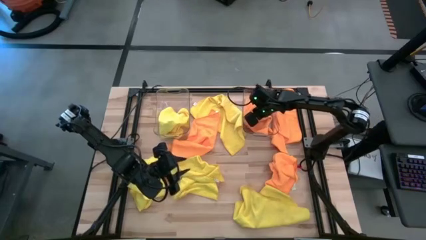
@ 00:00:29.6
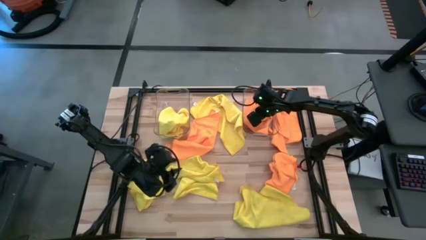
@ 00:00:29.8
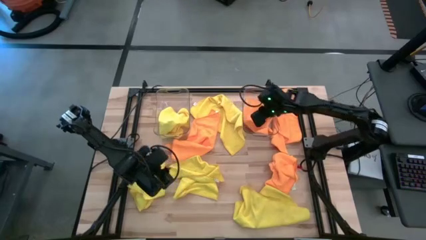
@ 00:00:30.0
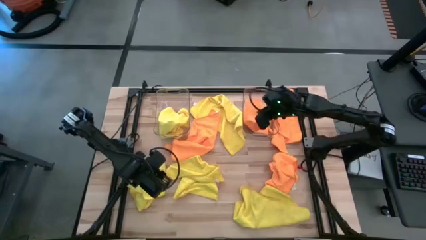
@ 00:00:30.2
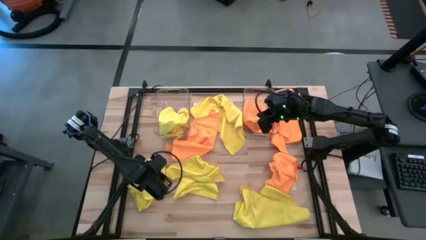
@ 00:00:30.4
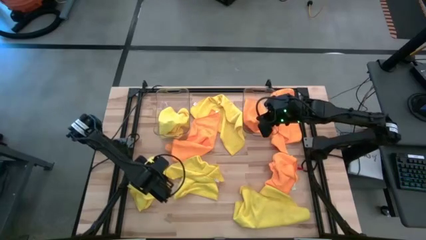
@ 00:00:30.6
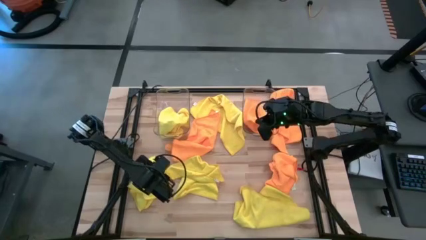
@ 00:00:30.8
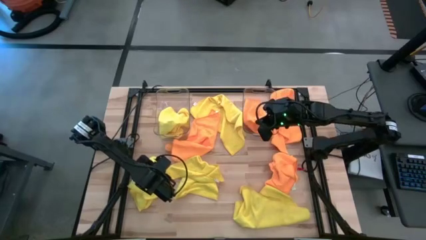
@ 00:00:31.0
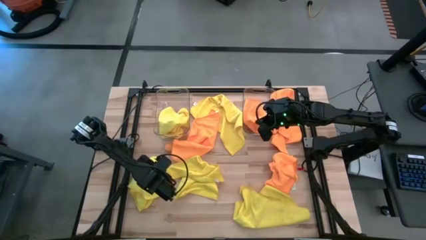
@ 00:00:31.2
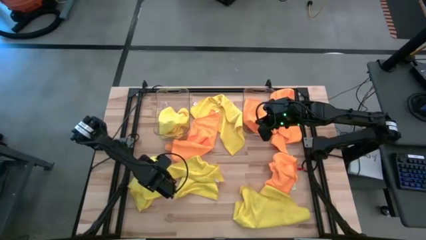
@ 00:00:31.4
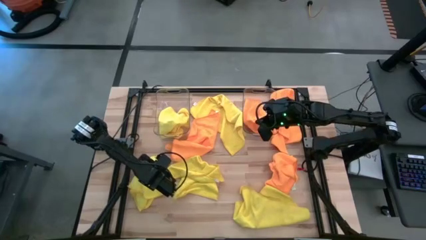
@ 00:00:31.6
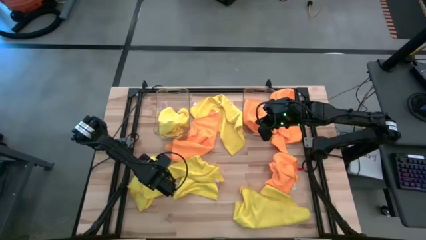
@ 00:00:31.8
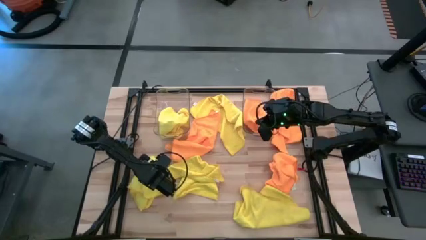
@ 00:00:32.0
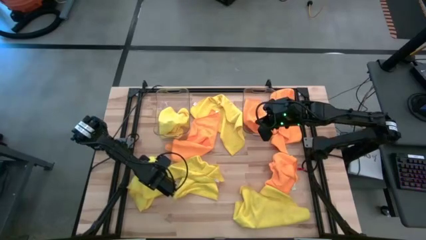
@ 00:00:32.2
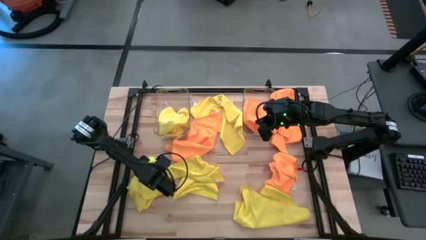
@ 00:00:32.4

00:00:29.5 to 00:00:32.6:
Task: Sort microfiber towel by color & place in baskets
Put the yellow microfiber cloth into the left transparent bin

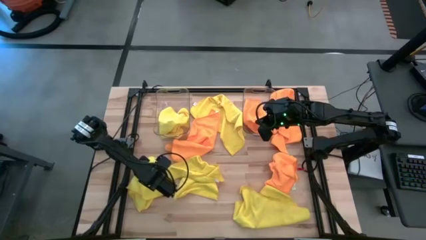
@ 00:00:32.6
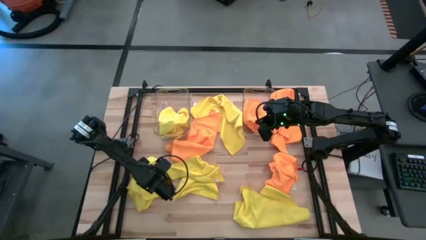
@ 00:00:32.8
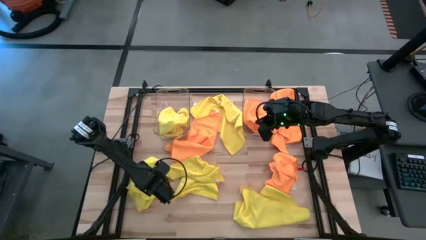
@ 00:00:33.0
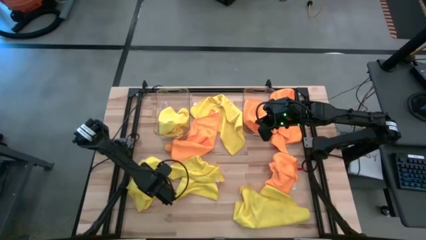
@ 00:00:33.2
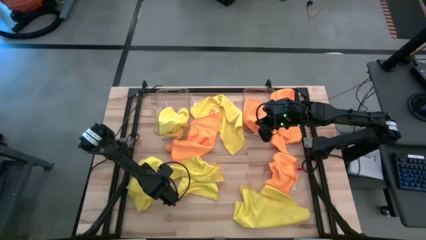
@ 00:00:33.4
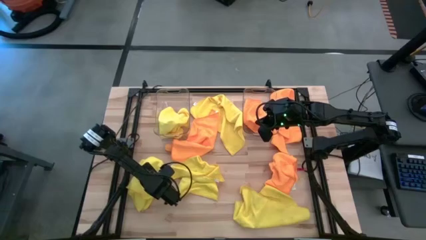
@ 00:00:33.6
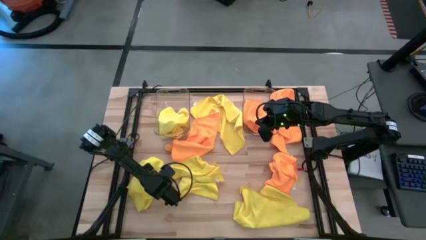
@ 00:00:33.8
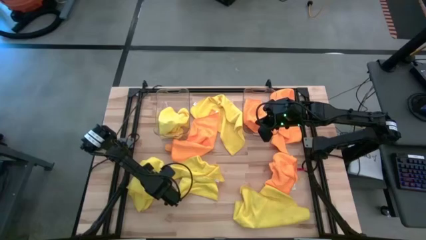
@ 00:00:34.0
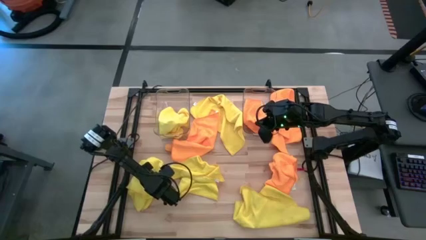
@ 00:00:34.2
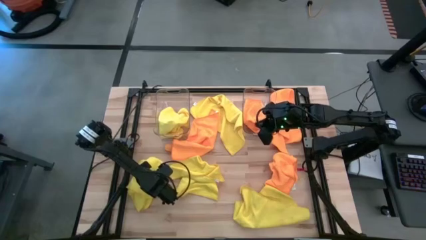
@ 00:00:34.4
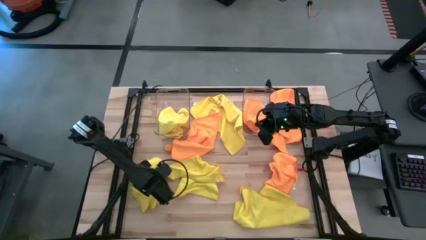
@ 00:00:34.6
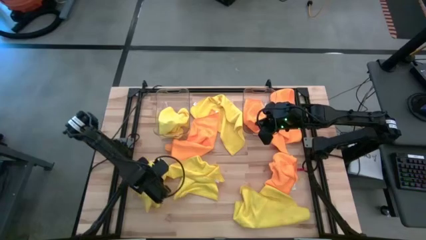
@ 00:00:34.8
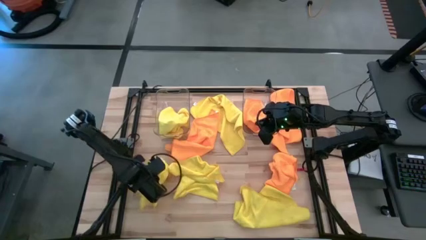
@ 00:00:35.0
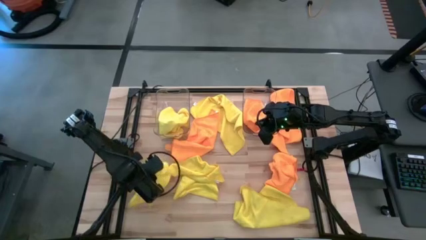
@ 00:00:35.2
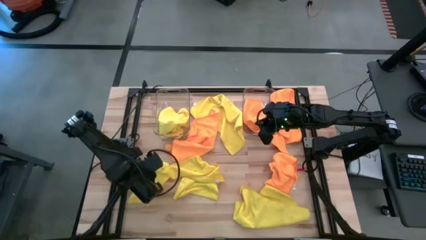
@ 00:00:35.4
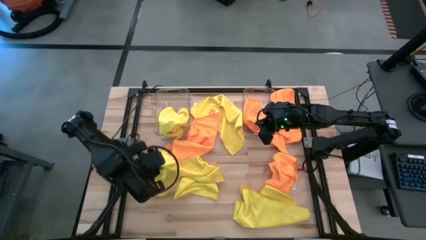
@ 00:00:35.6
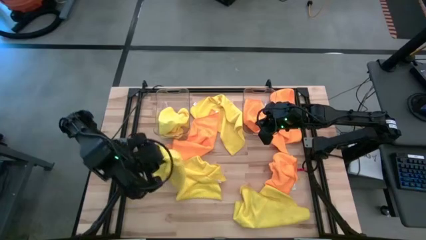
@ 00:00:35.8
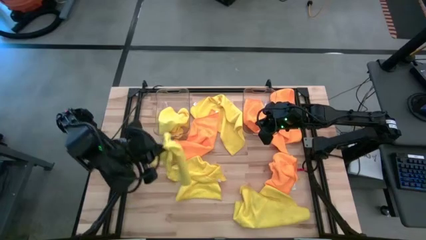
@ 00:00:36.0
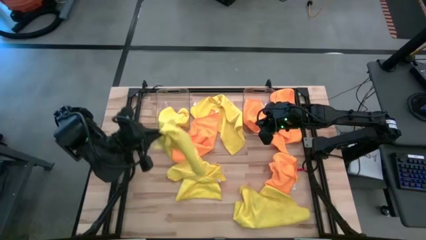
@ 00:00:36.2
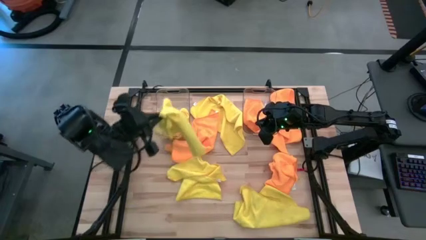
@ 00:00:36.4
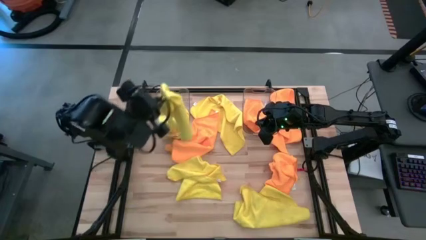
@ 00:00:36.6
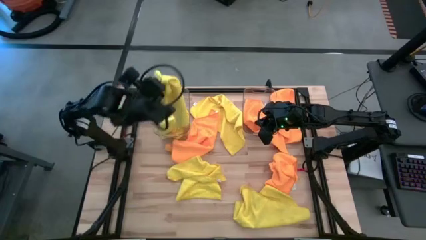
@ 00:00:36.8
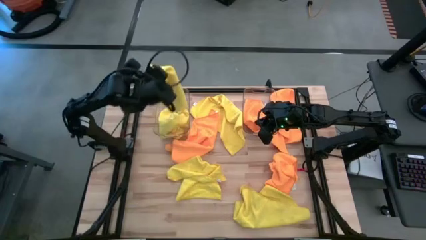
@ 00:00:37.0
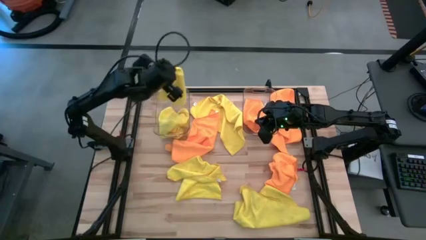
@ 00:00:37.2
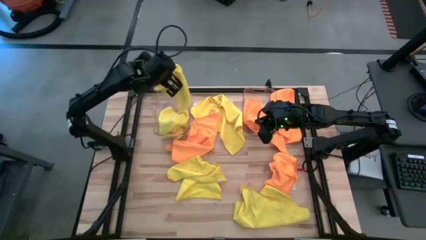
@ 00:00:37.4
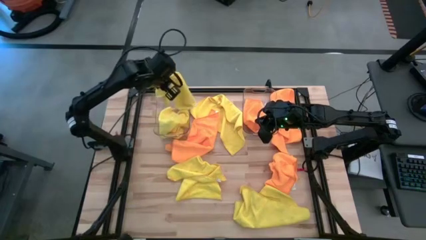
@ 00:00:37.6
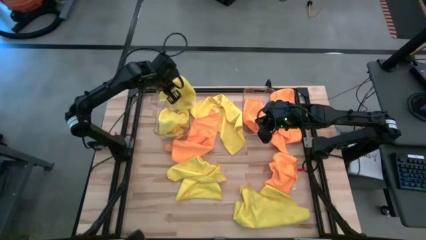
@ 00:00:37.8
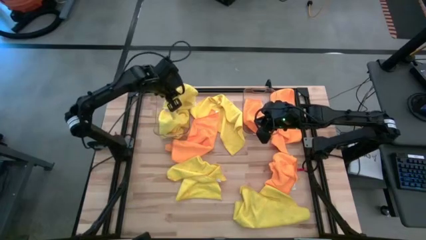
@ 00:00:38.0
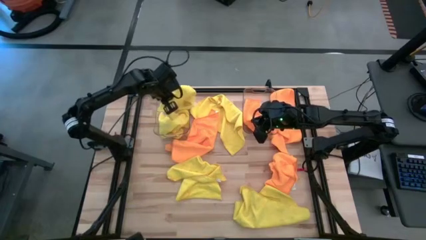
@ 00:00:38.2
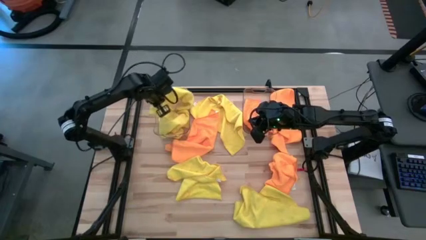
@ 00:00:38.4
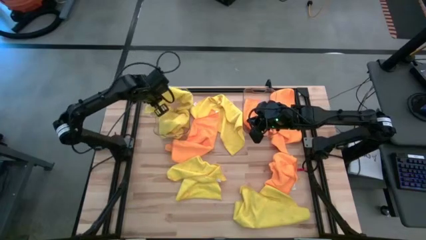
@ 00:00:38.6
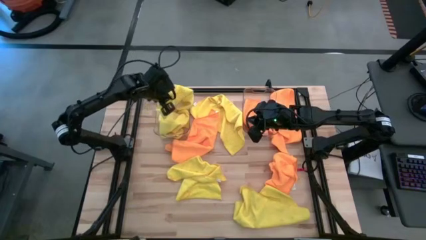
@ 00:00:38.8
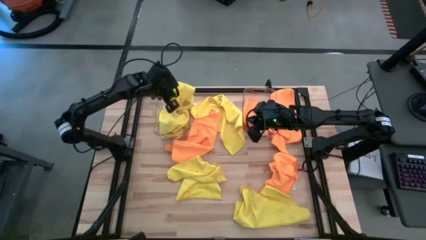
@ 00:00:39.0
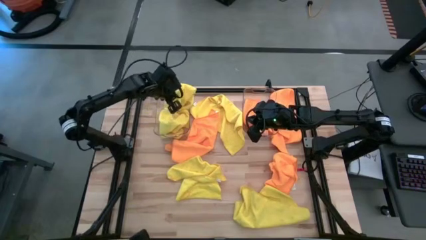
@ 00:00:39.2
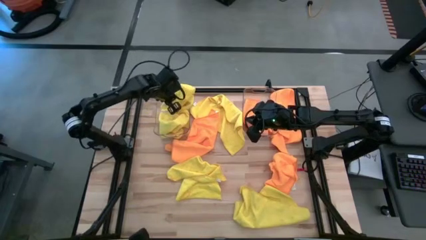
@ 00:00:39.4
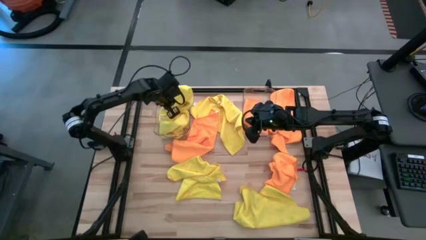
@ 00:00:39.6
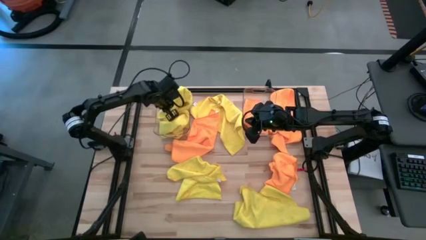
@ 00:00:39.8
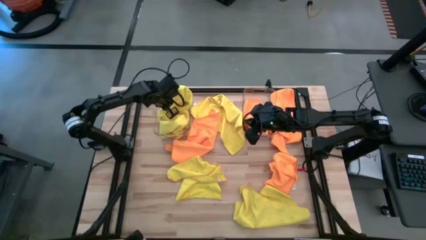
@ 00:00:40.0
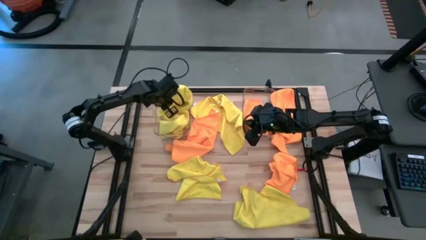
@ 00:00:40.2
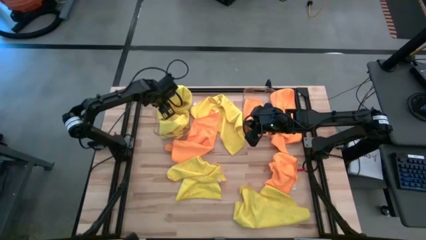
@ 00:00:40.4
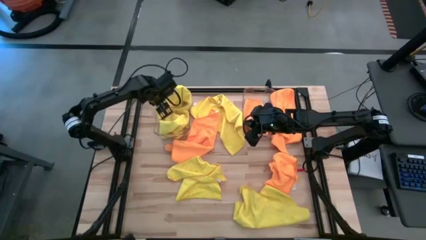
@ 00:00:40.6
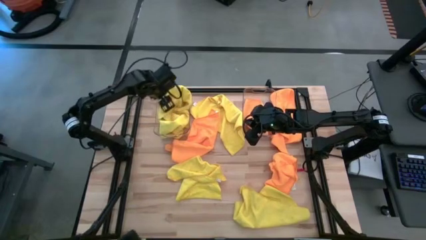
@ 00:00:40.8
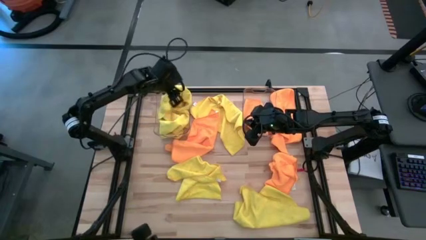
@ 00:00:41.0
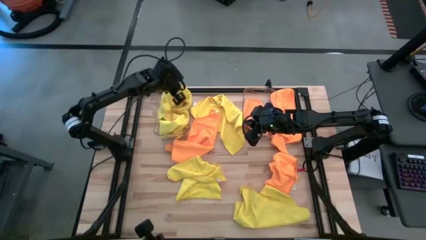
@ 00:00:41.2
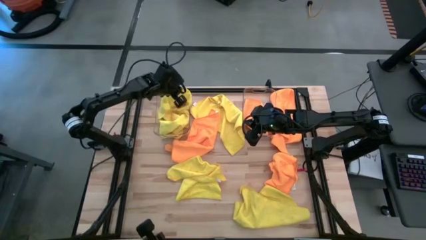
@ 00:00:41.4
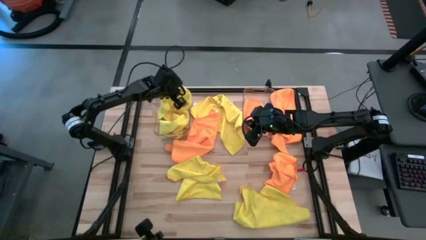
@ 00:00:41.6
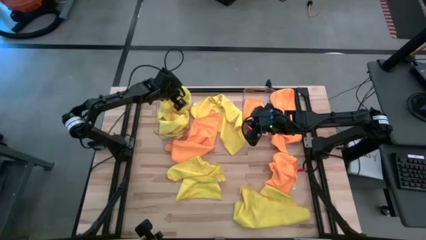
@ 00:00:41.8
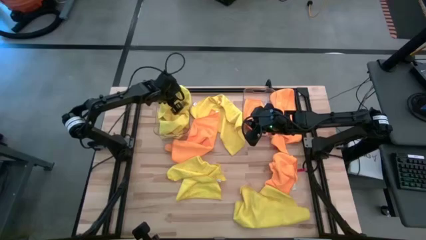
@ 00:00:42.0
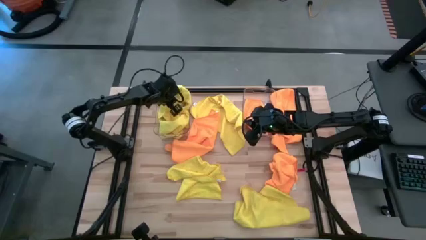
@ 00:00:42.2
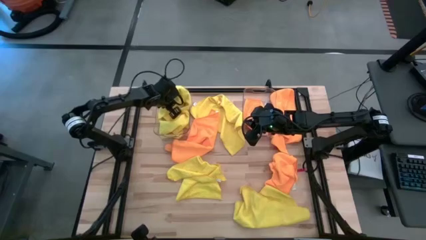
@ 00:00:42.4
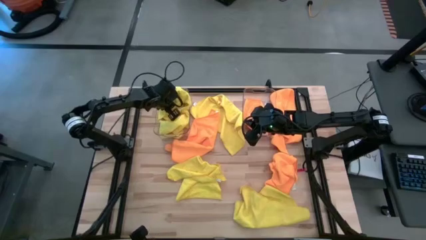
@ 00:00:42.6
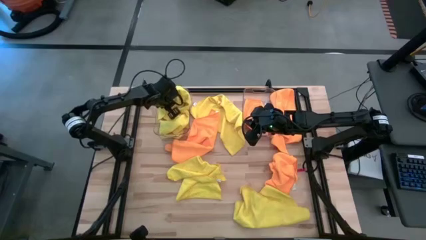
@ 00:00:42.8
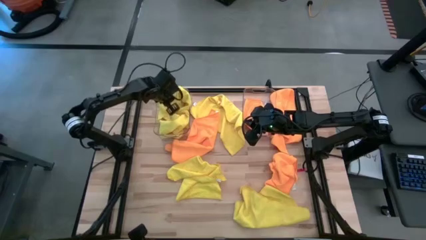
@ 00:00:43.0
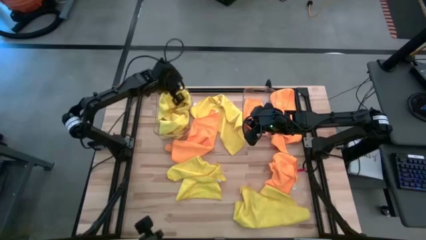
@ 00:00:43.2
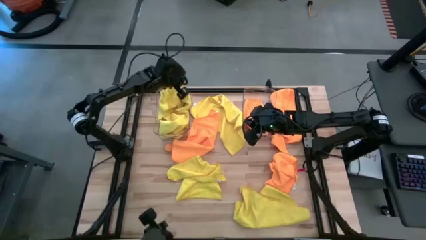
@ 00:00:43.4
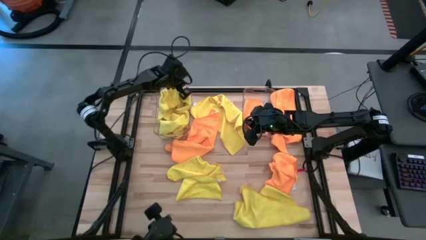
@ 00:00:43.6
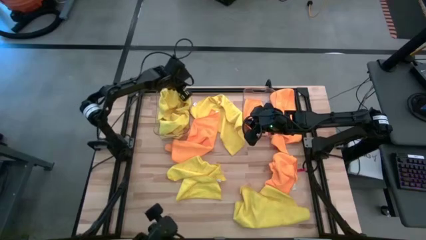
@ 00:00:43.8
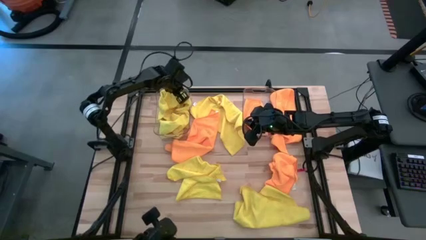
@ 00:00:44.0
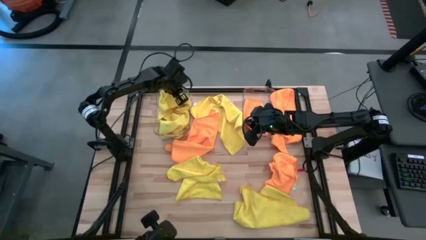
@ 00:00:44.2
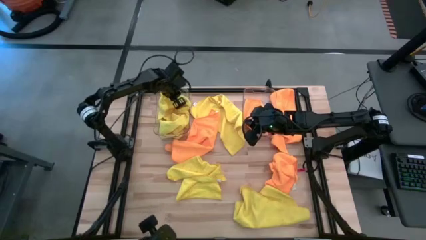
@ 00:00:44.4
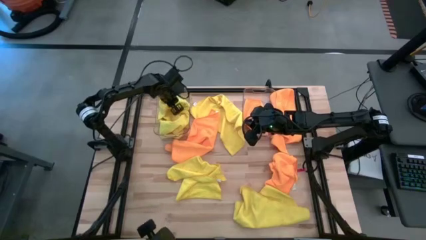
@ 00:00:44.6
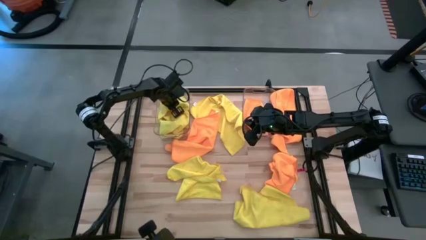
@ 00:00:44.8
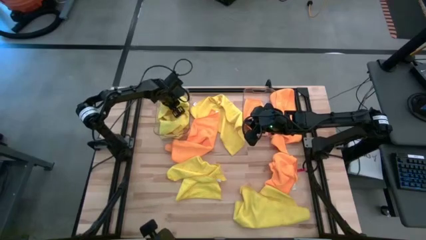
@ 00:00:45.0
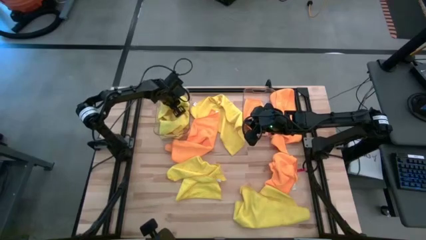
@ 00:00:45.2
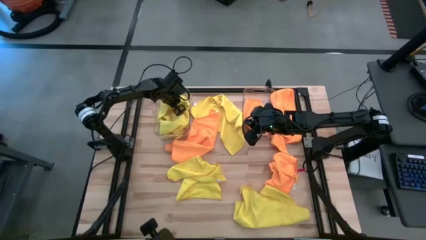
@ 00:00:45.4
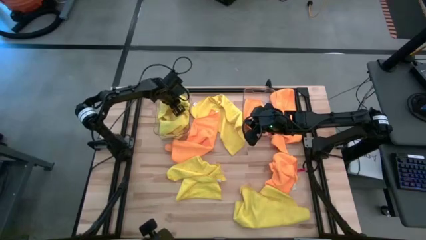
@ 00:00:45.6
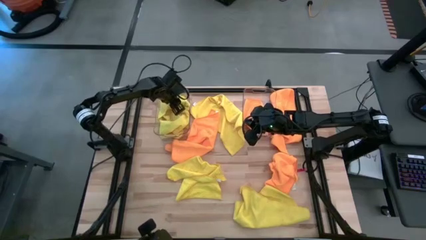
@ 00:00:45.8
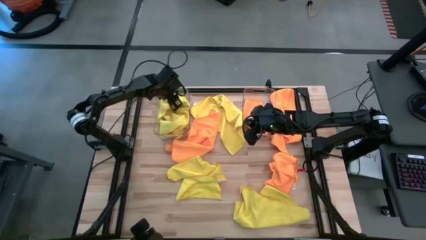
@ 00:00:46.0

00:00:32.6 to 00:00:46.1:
Put the yellow microfiber cloth into the left transparent bin
